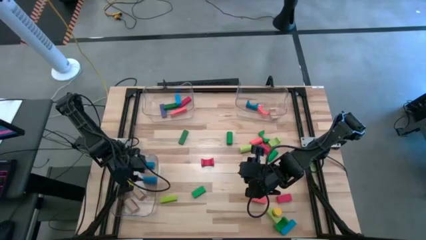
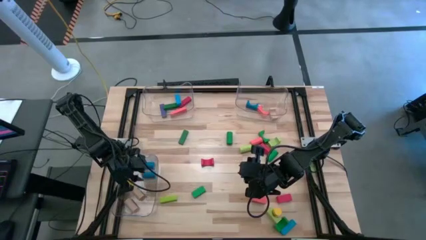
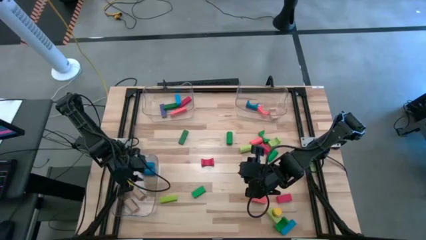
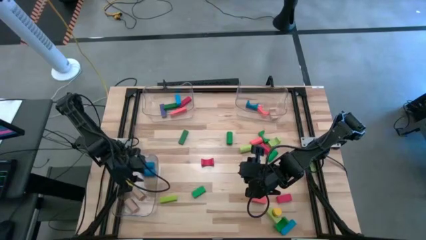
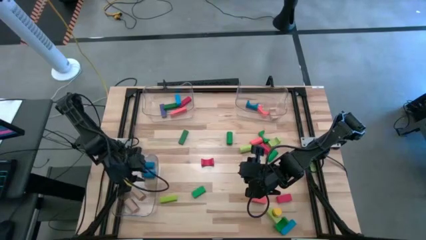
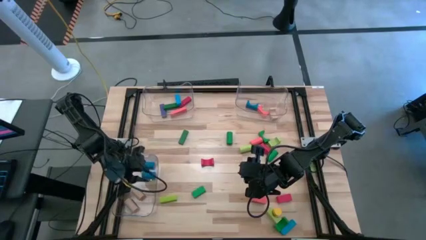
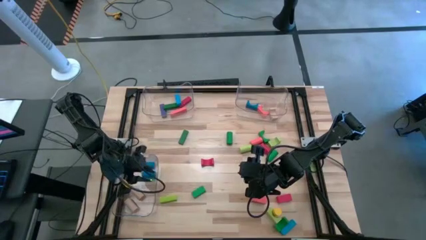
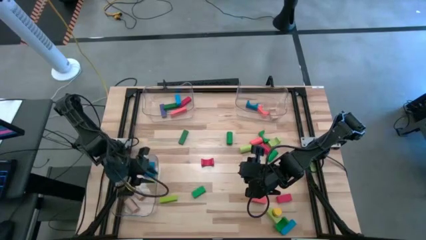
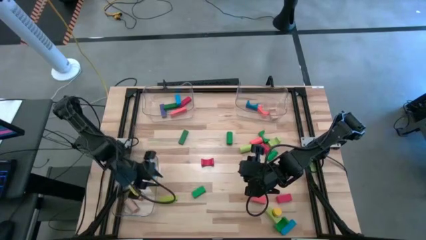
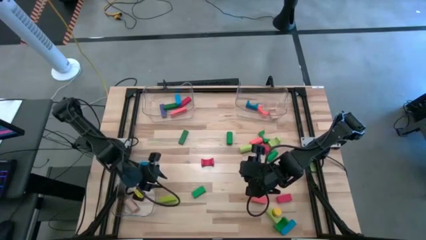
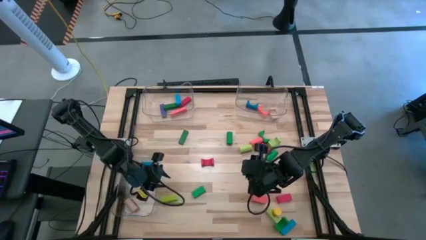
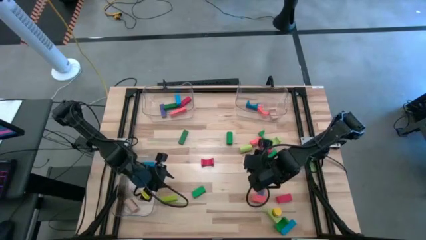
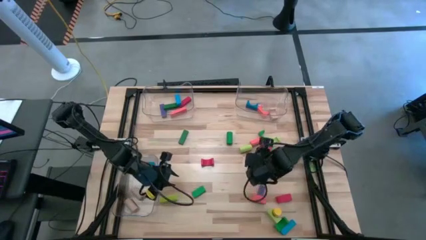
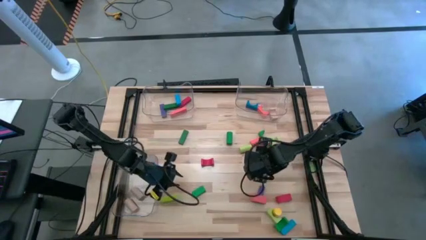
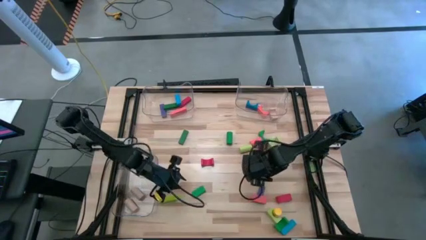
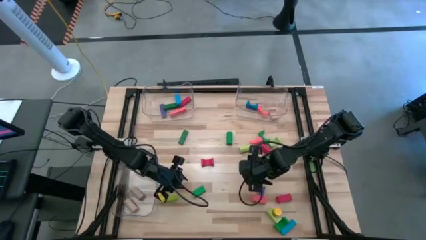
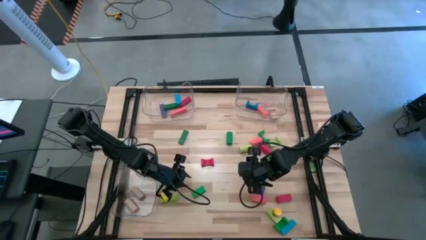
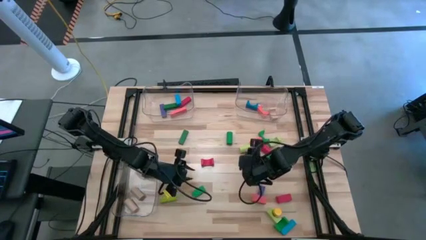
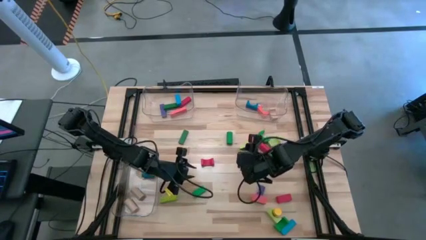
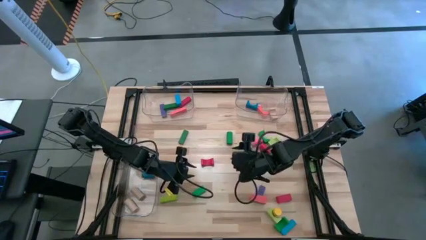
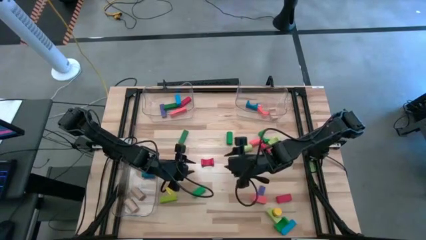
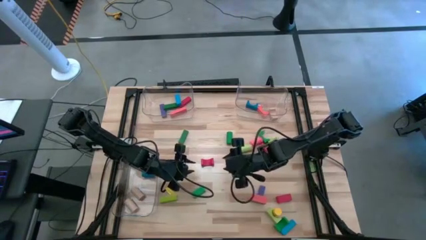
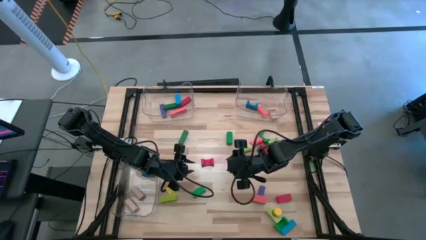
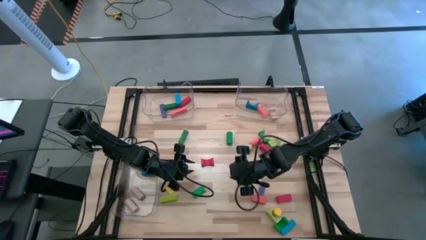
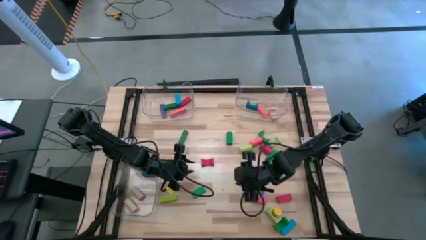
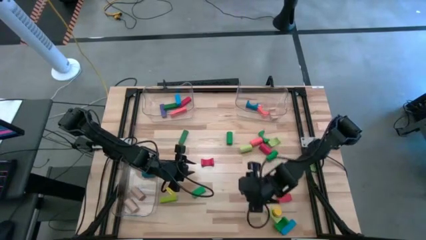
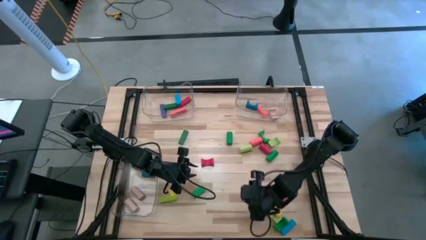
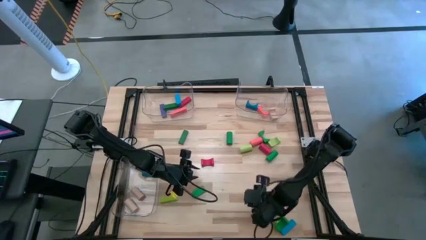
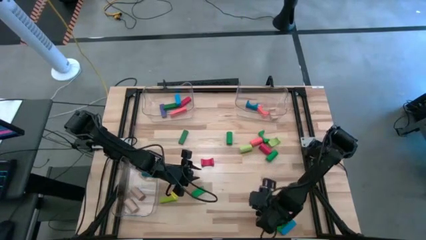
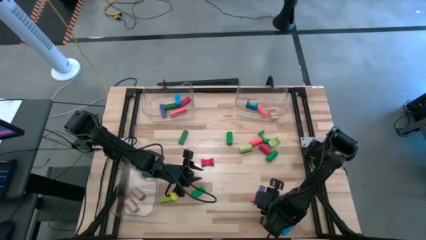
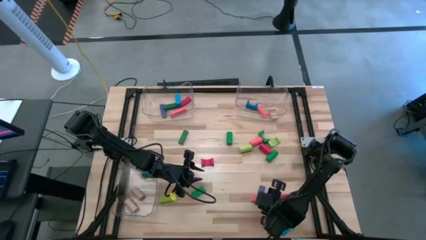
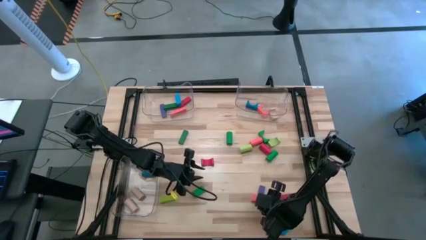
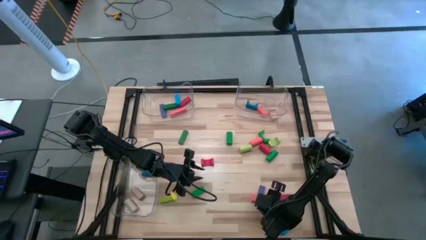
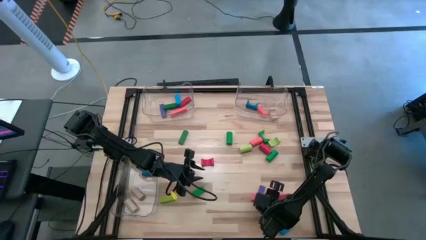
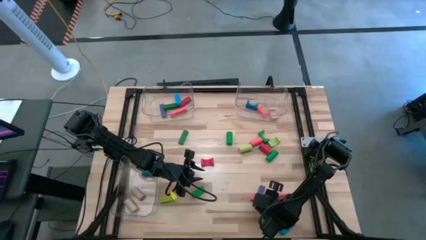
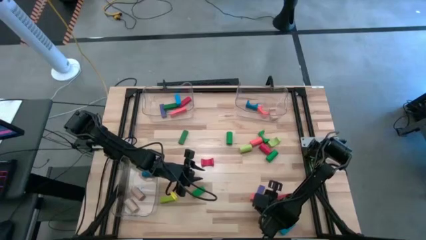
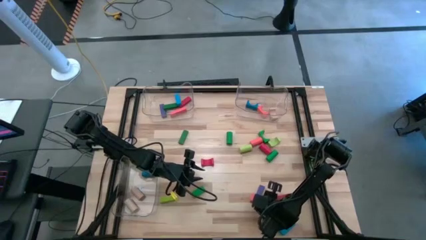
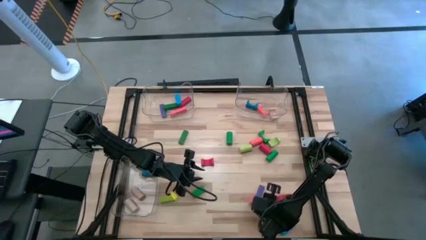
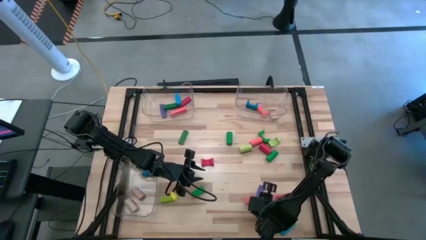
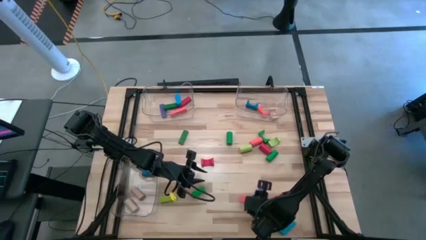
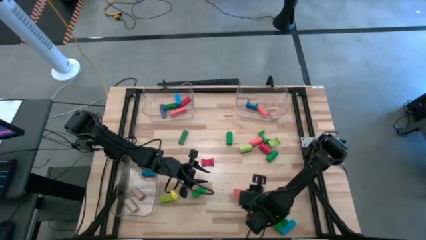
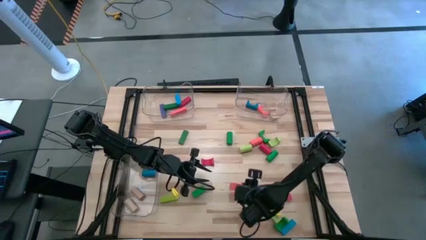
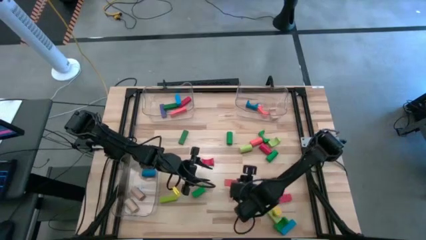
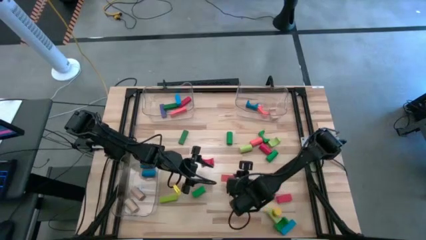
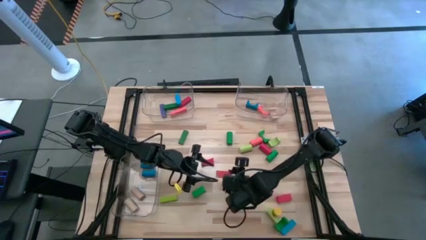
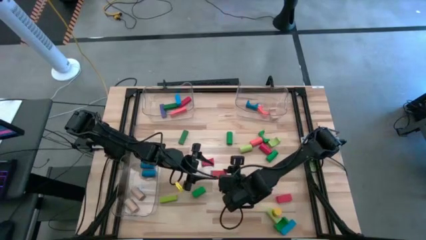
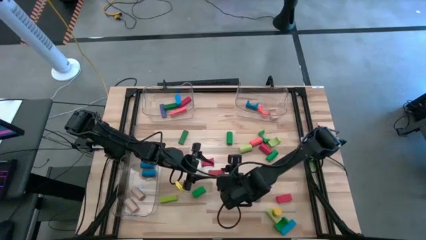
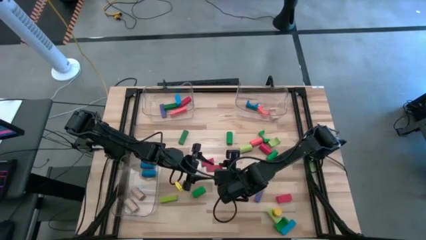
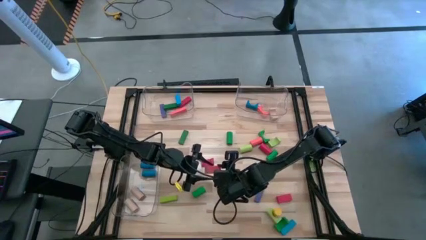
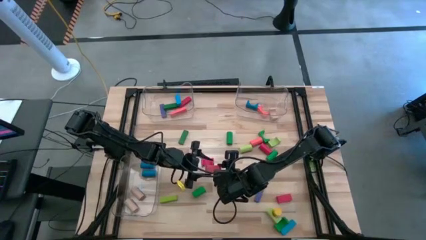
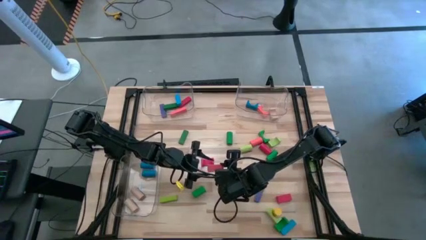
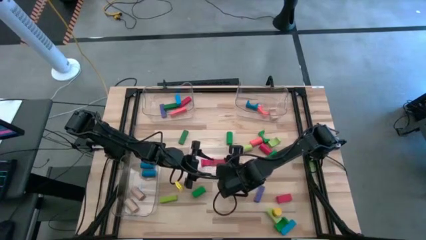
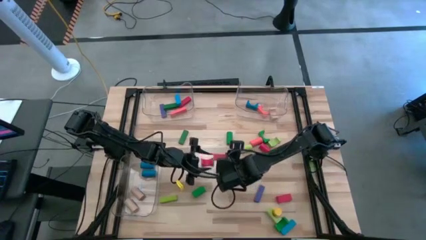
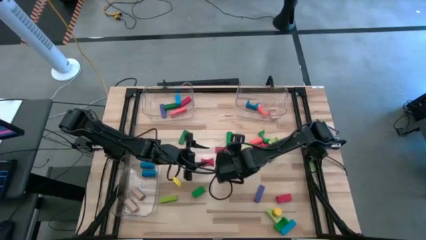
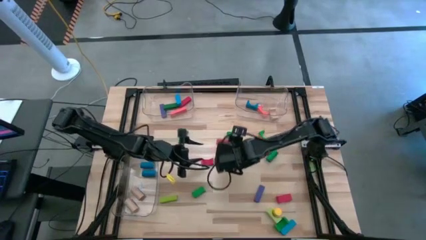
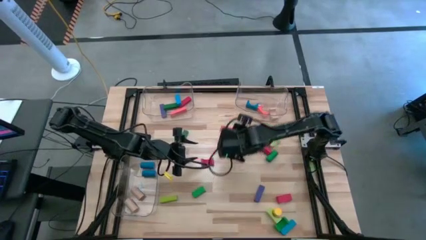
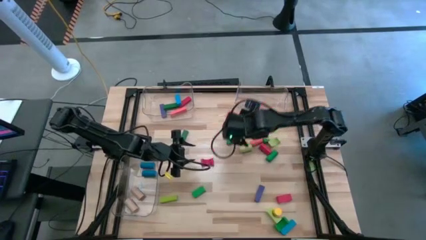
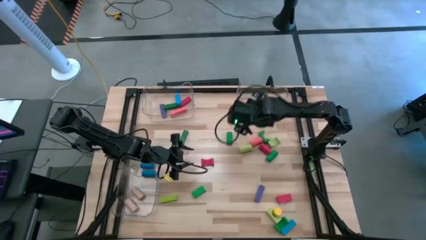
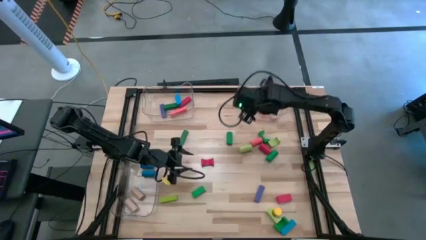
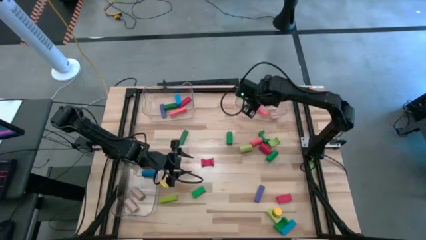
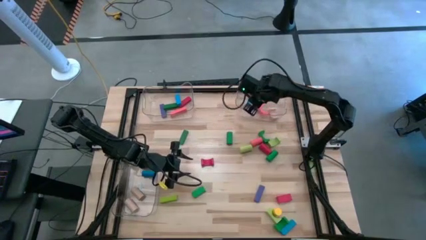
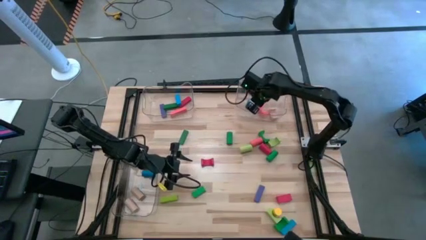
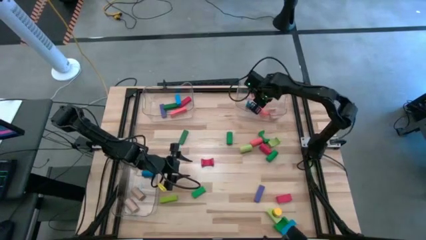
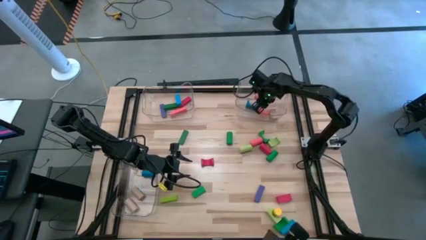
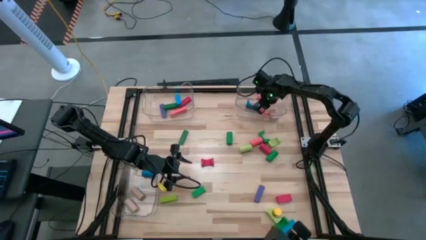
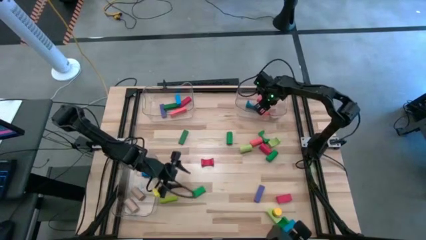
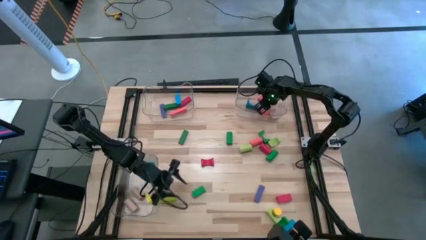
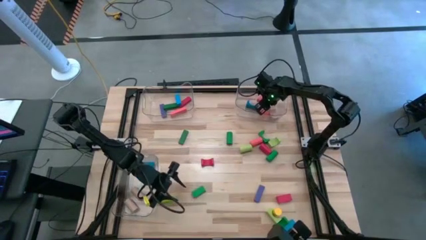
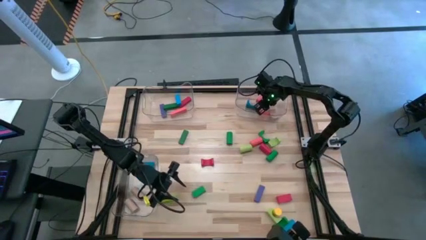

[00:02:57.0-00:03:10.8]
Task: Sort blocks by size
Put the orange arch block into the top right transparent bin

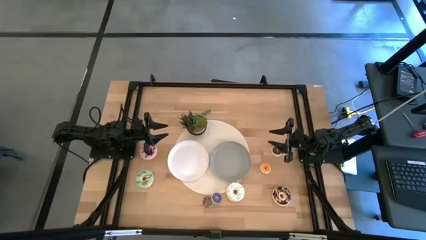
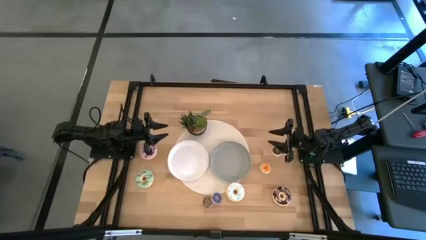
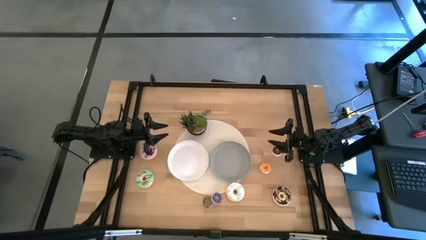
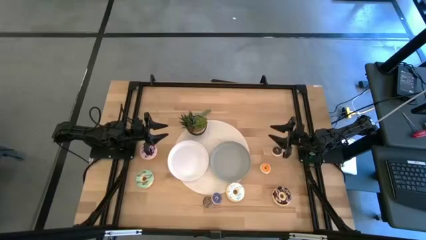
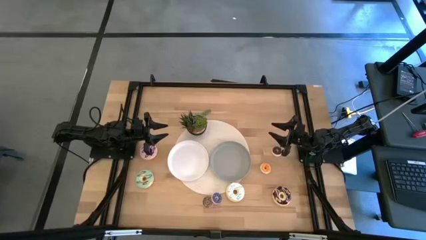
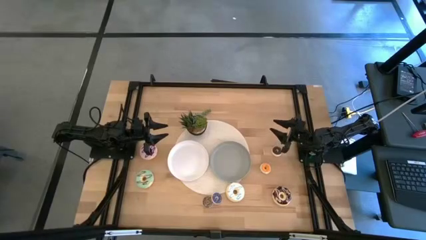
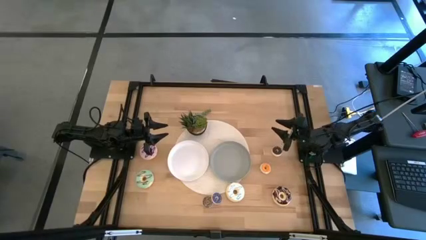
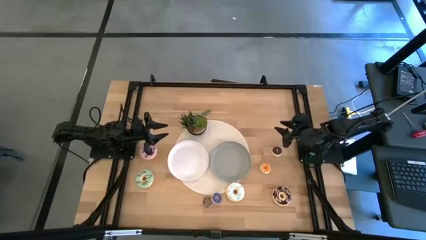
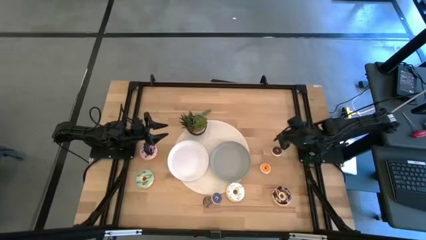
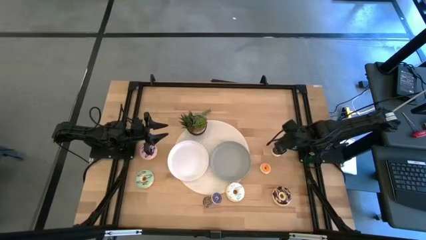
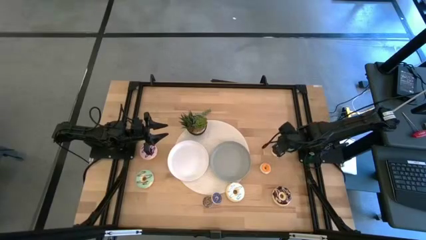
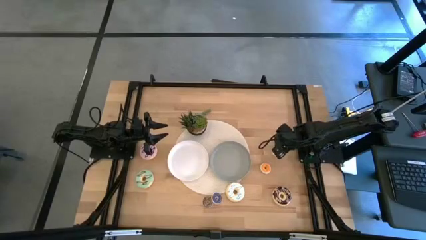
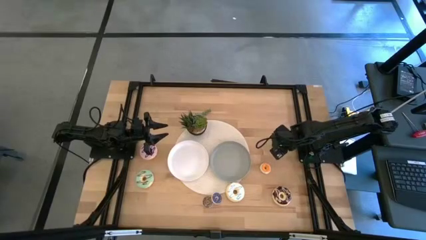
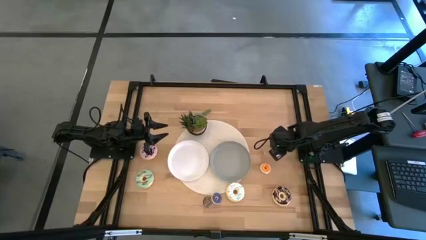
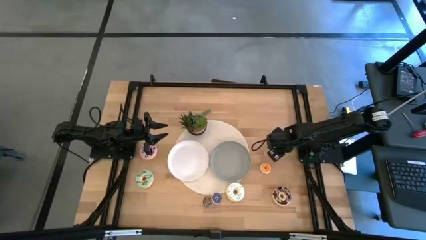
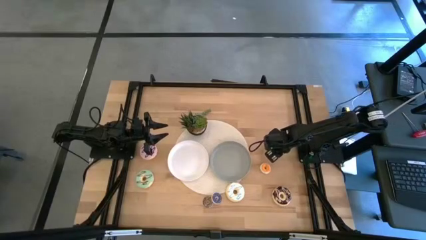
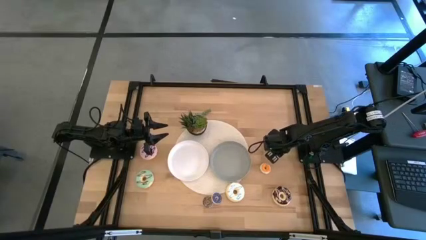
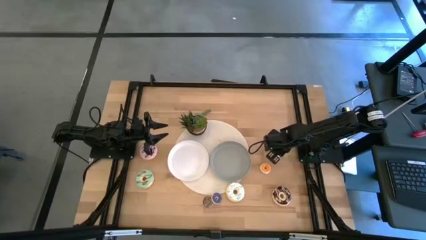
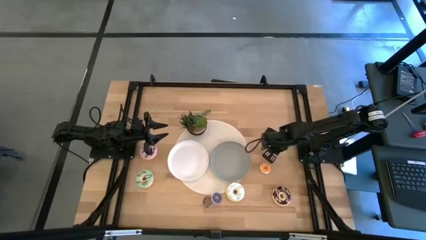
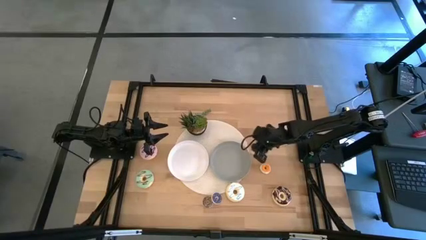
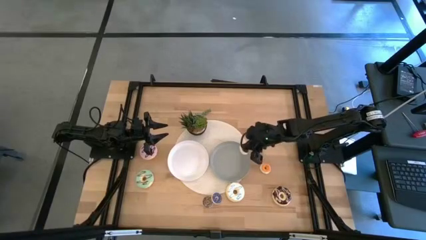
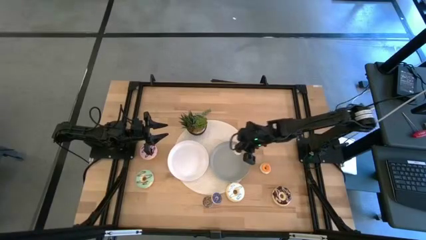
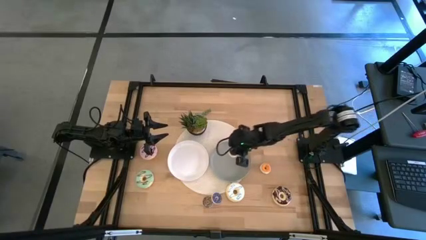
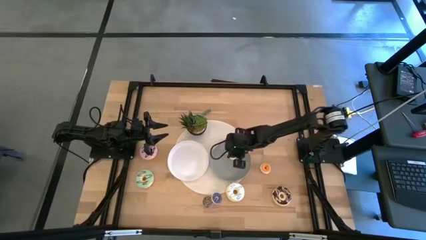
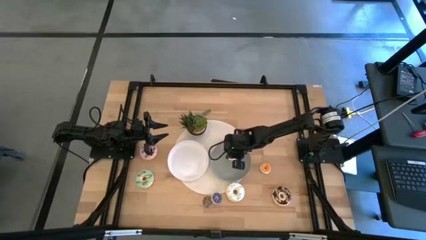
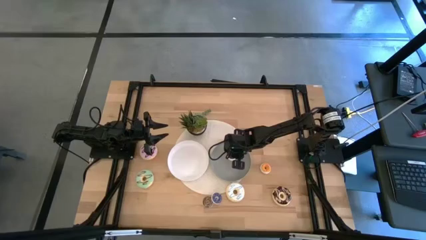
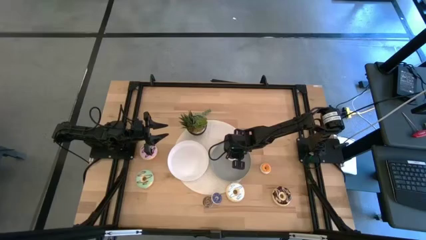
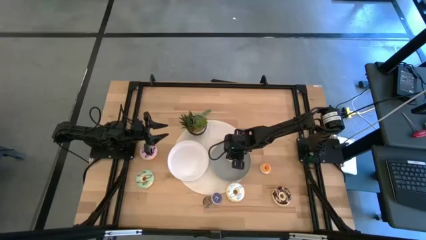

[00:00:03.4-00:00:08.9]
Task: Pick & Place donuts
Put the small black donut onto the gray plate
